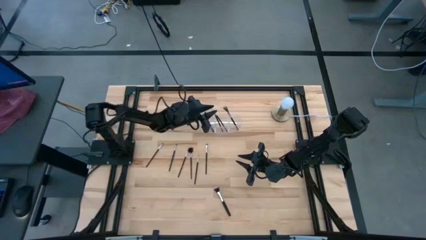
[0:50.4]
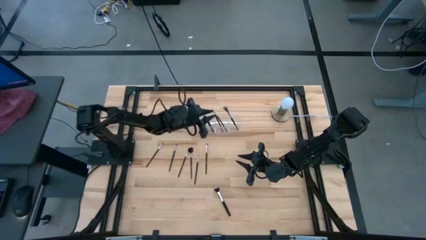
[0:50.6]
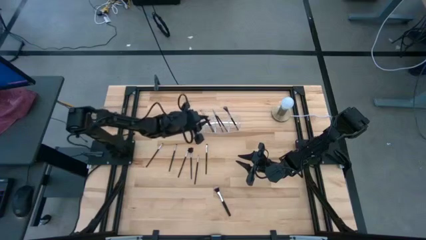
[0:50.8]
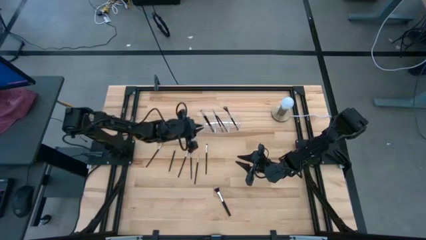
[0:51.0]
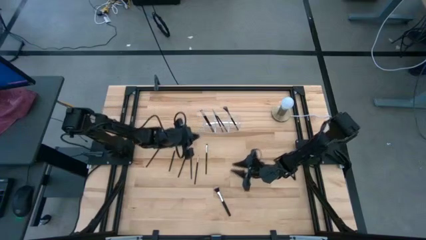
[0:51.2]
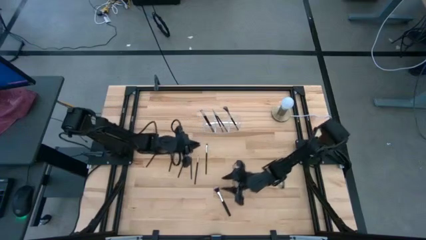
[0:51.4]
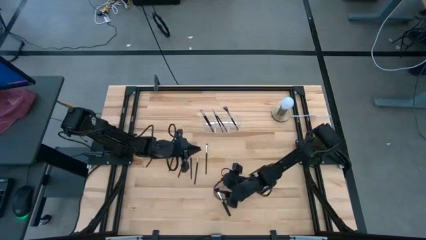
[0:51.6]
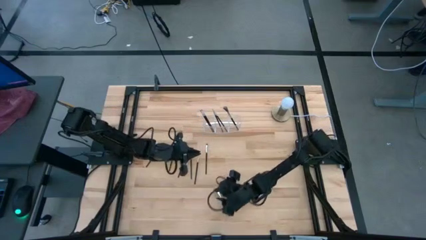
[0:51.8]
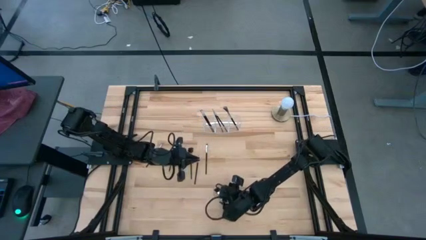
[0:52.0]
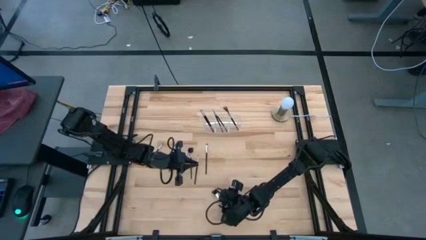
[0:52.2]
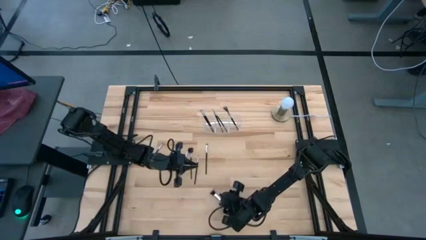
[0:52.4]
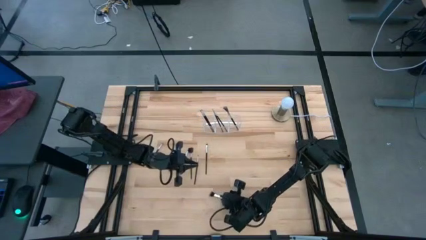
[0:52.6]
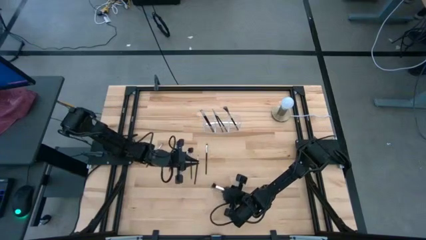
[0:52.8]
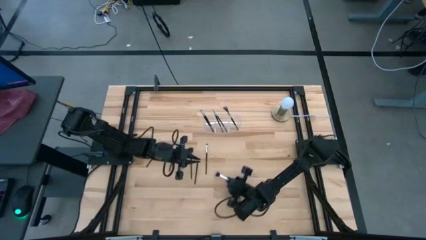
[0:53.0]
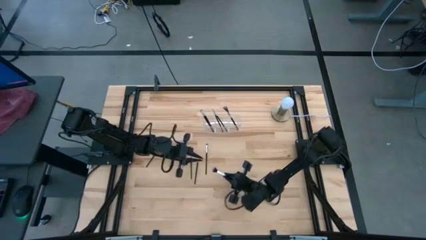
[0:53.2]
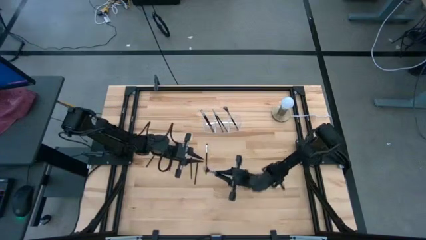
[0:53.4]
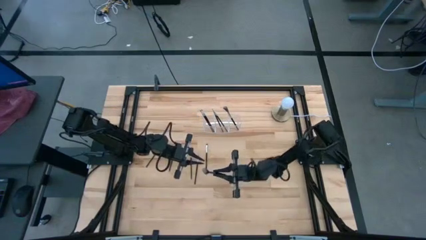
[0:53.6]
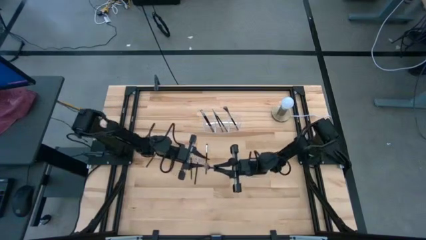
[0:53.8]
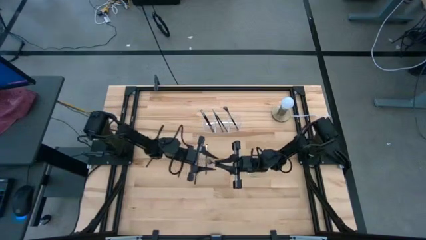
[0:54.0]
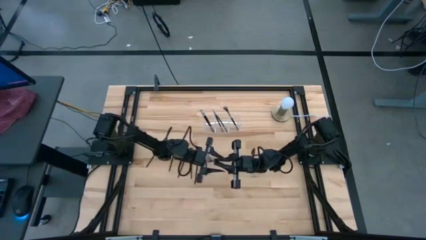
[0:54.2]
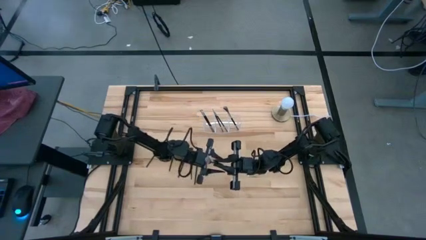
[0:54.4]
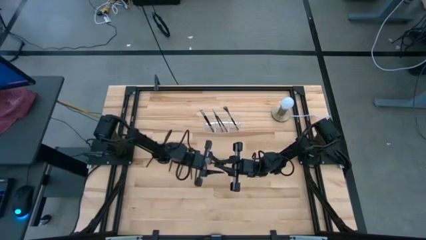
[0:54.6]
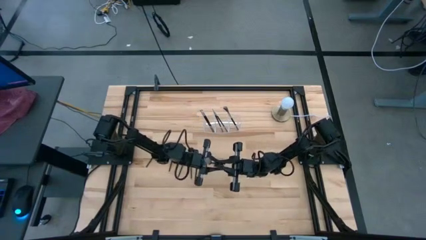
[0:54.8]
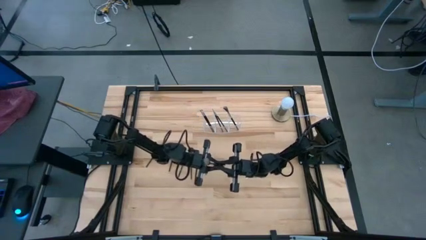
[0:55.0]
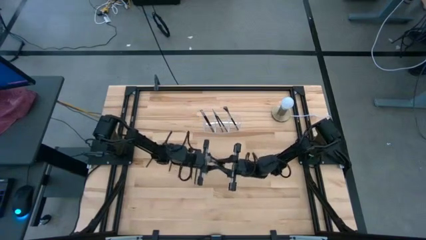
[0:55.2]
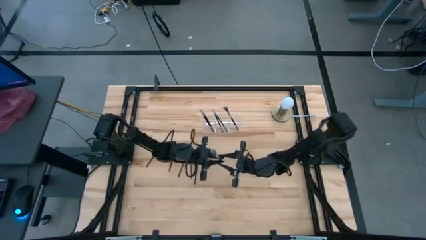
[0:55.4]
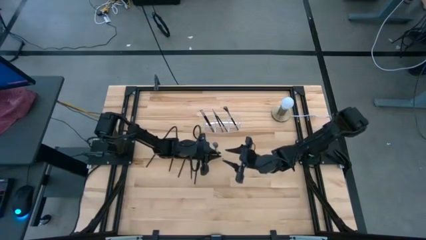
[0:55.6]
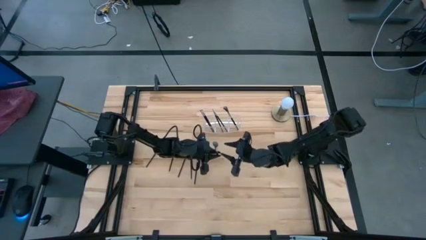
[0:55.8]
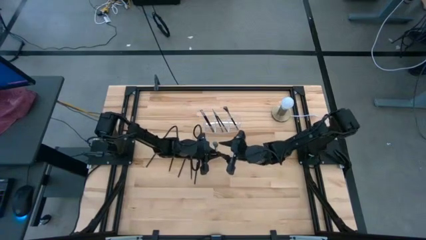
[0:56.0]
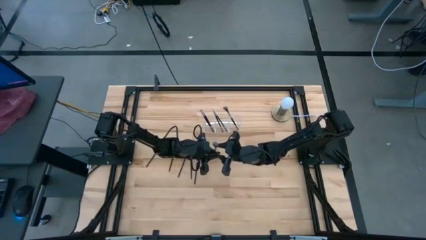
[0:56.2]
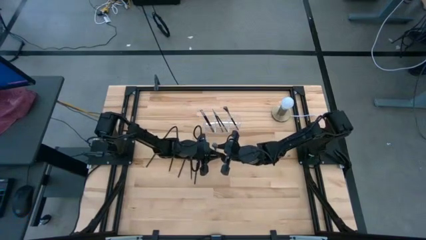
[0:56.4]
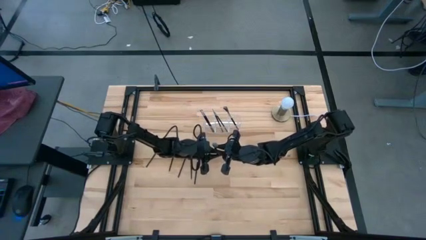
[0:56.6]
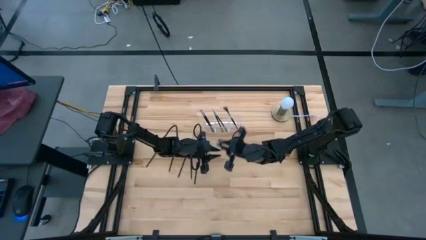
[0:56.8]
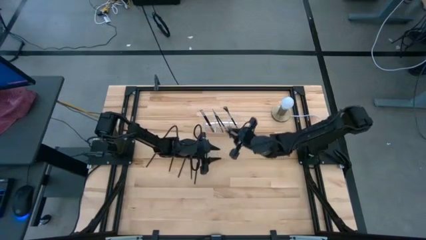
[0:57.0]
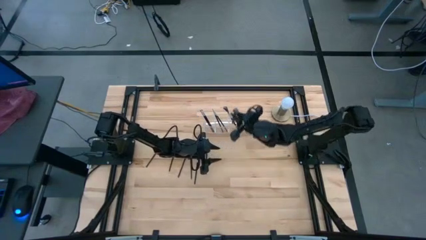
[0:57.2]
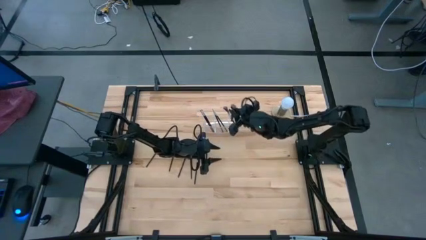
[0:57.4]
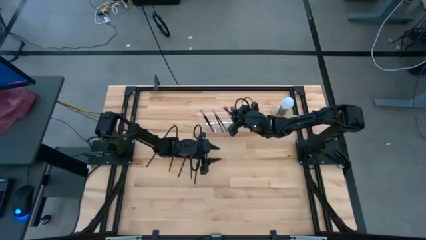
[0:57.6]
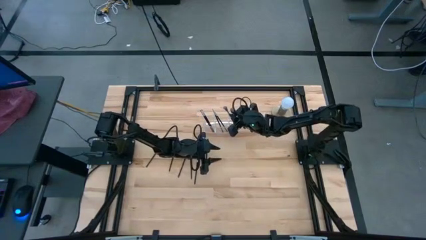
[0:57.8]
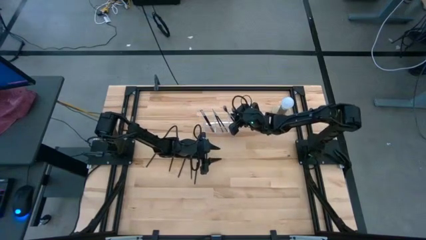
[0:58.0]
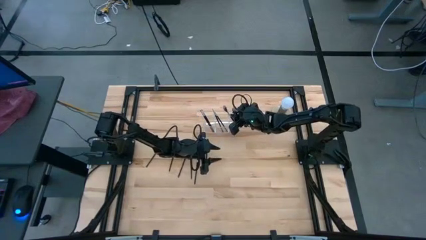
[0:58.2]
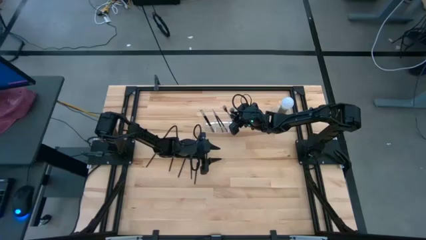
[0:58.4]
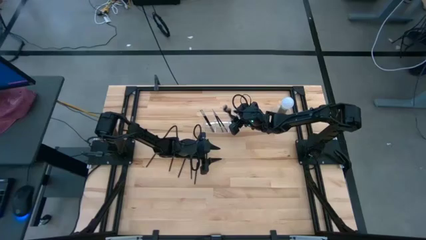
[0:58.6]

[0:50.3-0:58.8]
Task: Put items in baskets/containers
Put the black powder brush into the transparent organizer

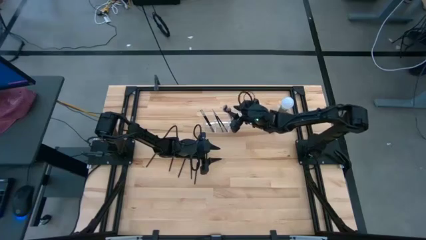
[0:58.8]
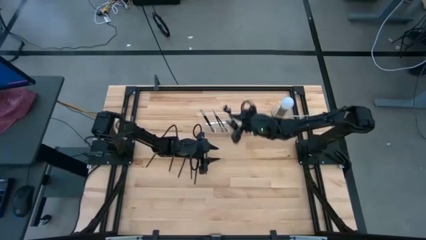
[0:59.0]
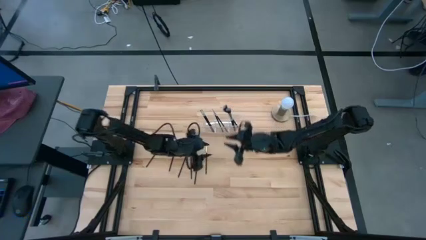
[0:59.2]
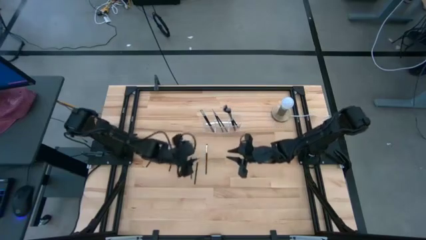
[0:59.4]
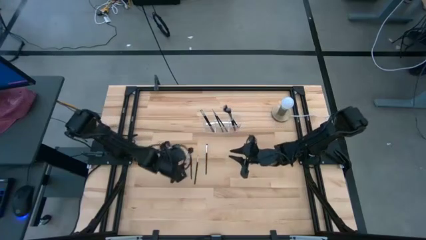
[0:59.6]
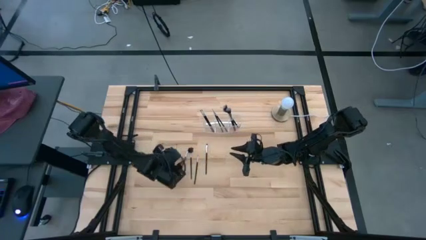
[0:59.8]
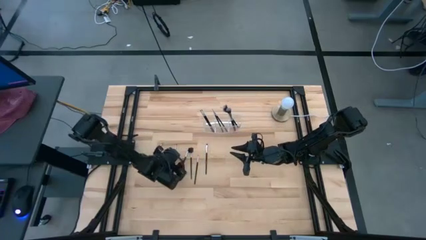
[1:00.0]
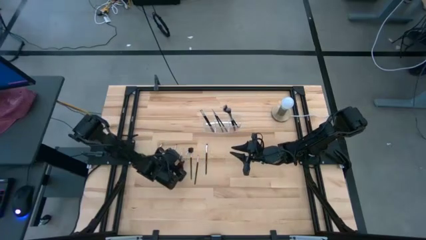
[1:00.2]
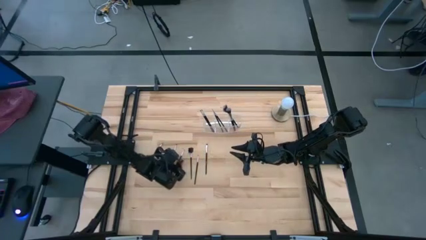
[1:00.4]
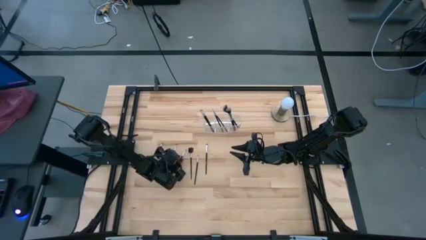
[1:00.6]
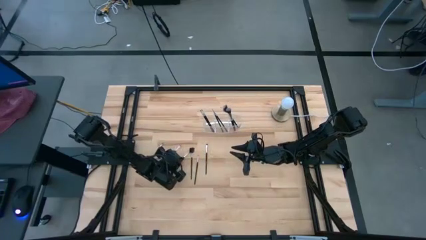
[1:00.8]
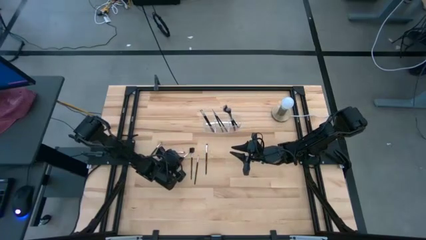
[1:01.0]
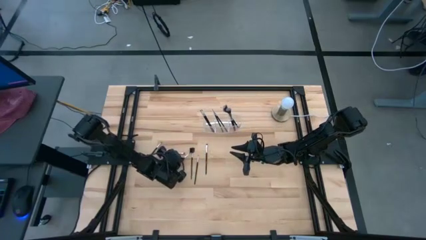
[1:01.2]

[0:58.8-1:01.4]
Put the black liner brush into the transparent organizer

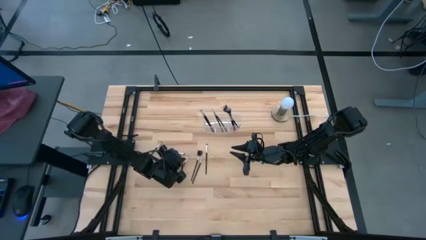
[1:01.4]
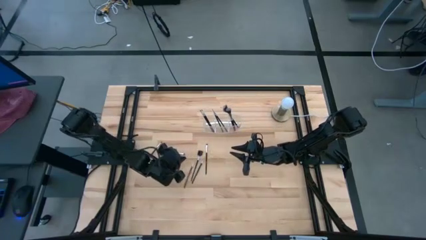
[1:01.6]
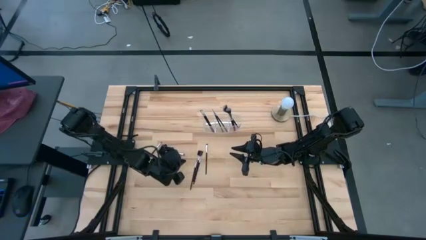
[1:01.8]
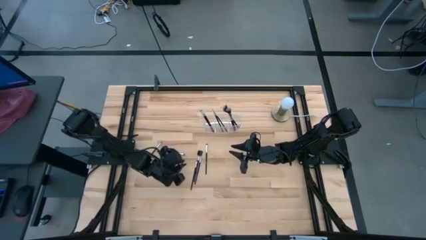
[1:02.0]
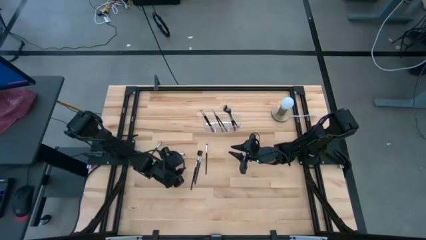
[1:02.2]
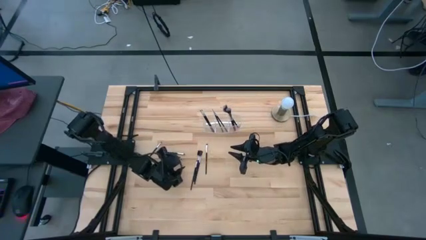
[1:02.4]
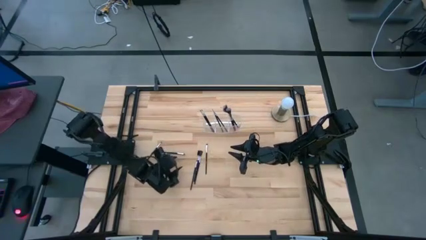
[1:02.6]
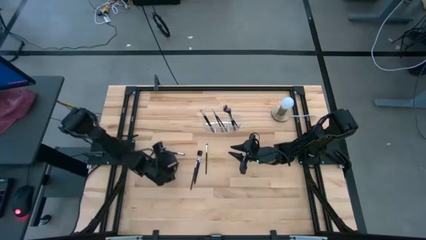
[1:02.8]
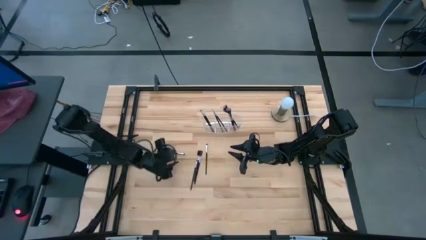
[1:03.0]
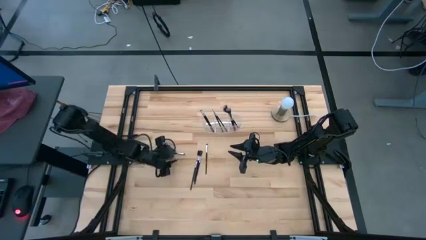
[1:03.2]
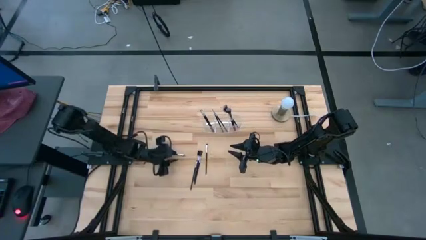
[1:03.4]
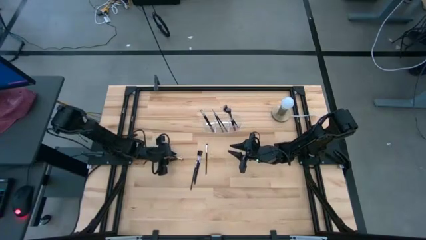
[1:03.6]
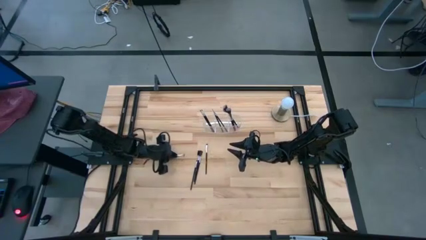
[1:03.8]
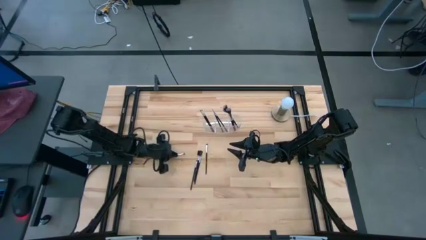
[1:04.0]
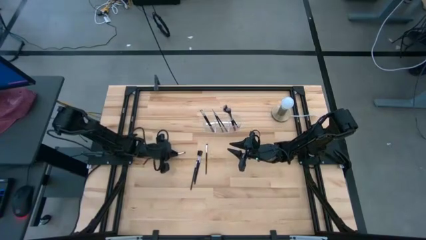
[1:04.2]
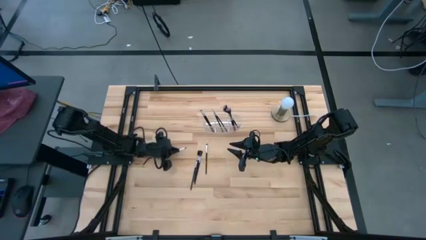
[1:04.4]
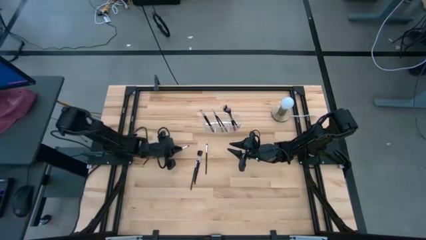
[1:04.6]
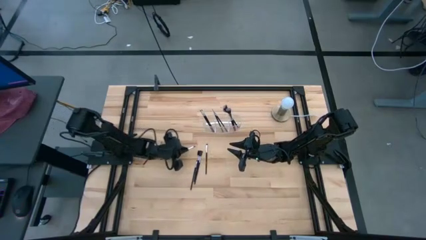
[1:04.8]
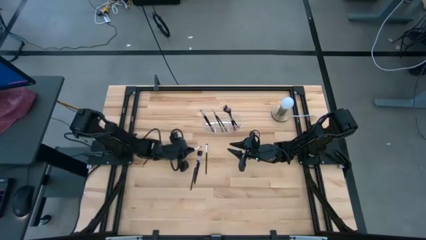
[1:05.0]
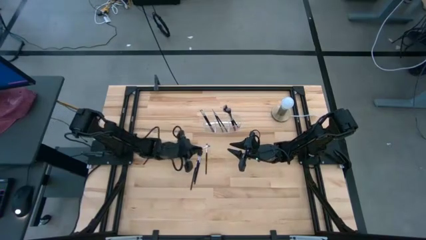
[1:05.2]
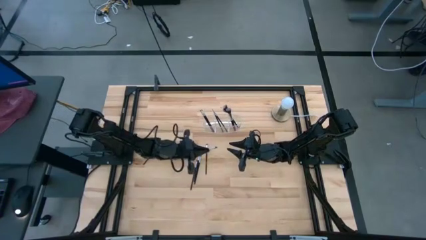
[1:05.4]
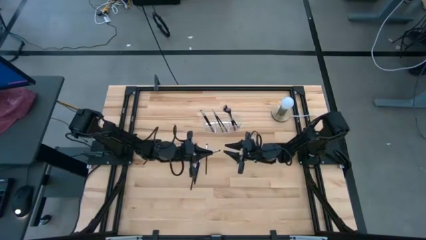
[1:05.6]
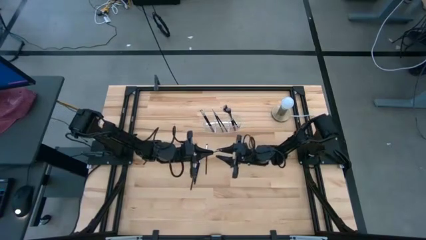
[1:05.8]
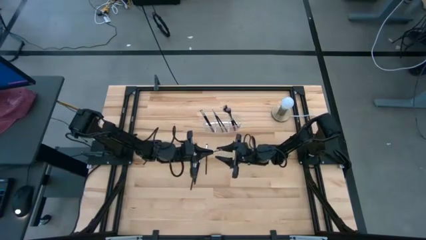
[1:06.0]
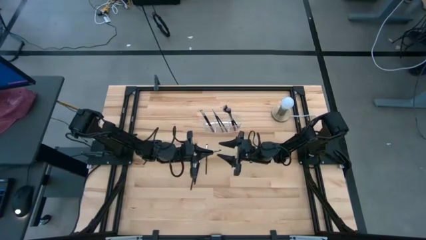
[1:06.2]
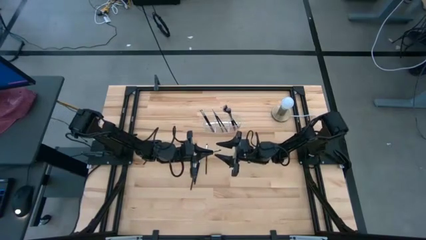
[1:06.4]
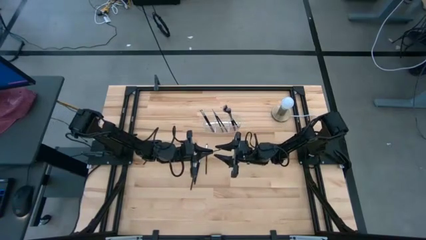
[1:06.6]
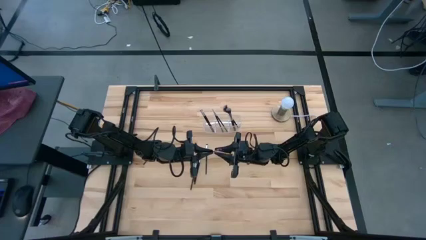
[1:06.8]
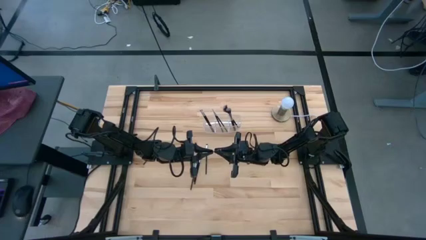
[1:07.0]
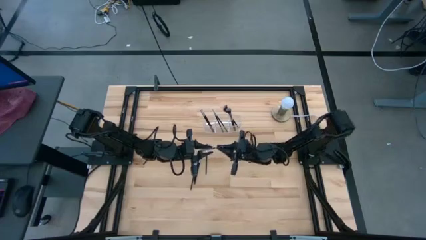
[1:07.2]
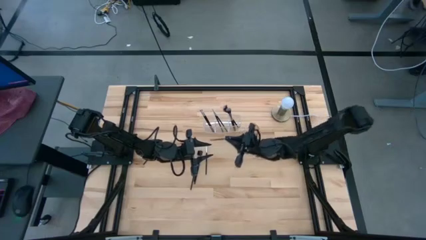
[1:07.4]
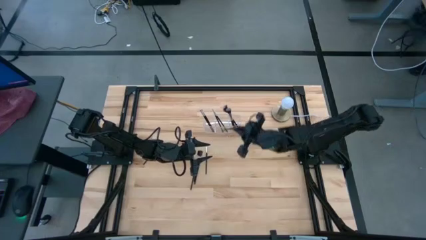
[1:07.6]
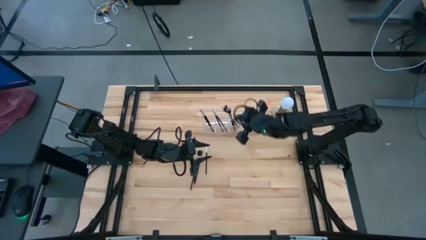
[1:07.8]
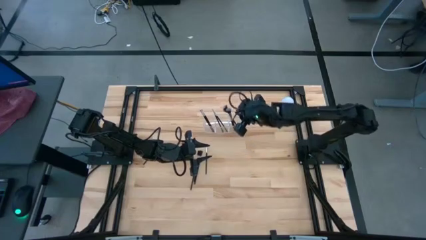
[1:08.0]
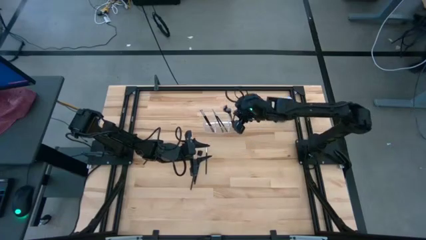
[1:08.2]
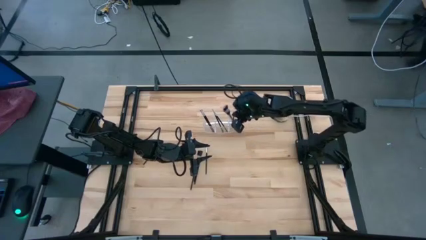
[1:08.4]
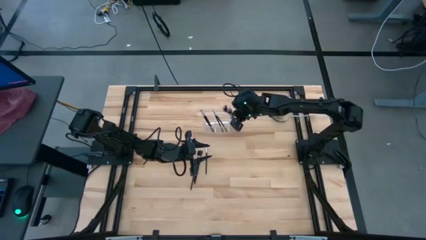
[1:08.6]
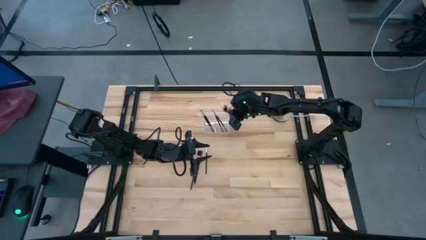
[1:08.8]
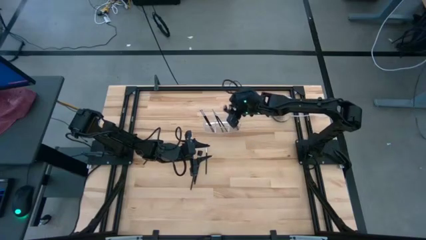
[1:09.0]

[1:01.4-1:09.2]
Put the black eyeshadow brush into the transparent organizer
